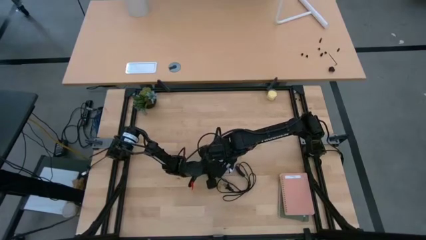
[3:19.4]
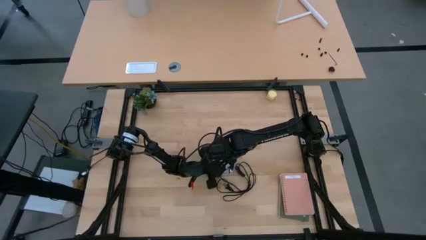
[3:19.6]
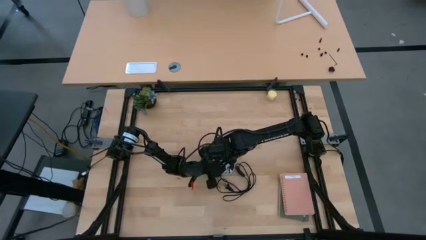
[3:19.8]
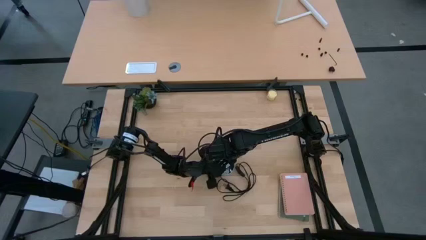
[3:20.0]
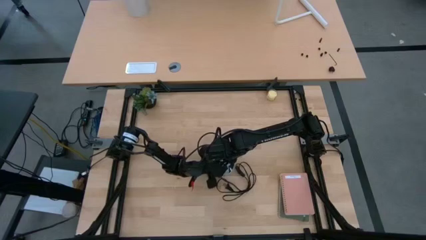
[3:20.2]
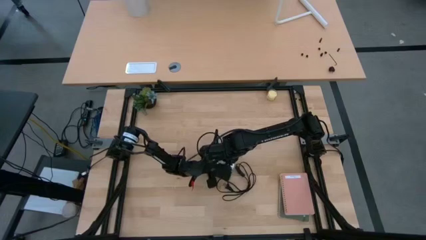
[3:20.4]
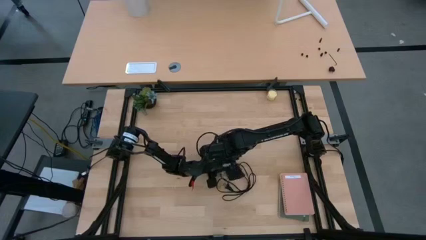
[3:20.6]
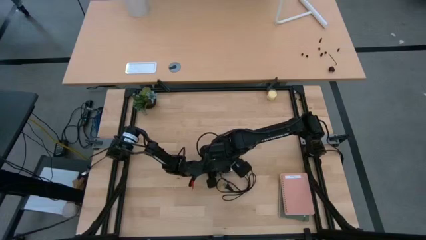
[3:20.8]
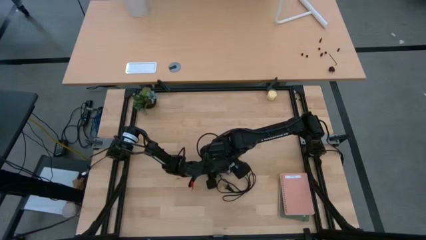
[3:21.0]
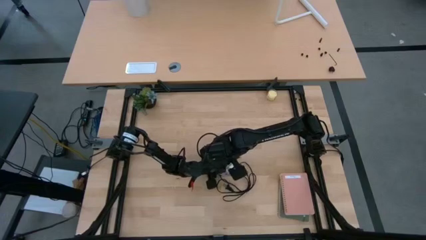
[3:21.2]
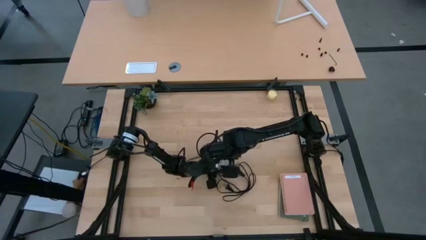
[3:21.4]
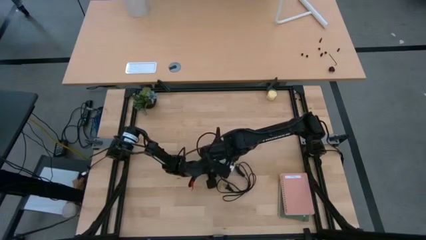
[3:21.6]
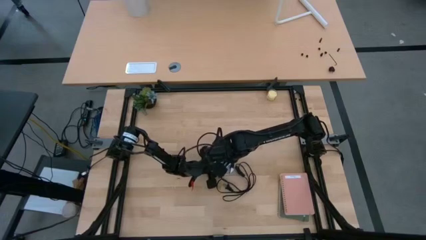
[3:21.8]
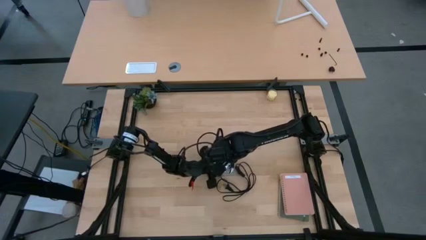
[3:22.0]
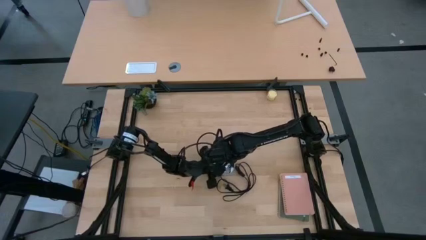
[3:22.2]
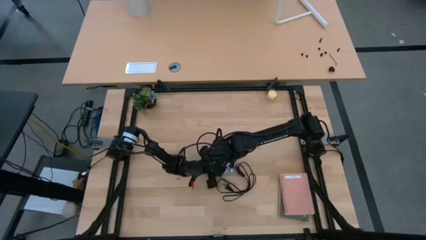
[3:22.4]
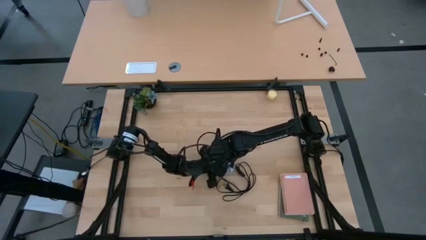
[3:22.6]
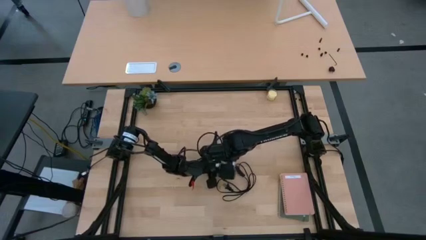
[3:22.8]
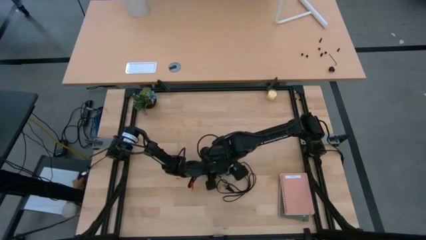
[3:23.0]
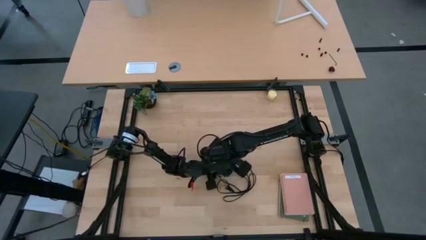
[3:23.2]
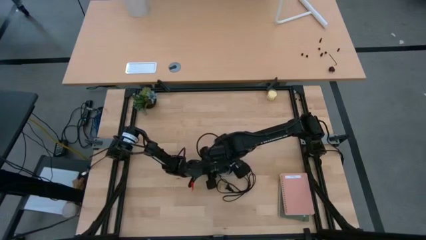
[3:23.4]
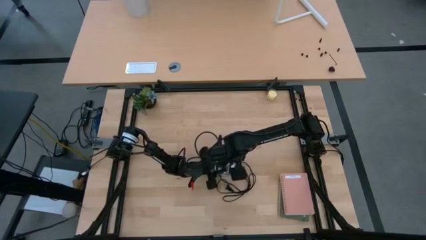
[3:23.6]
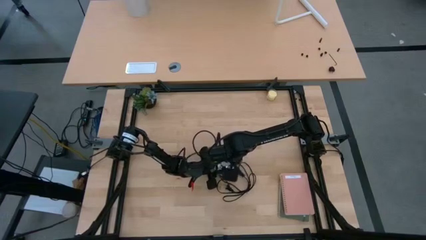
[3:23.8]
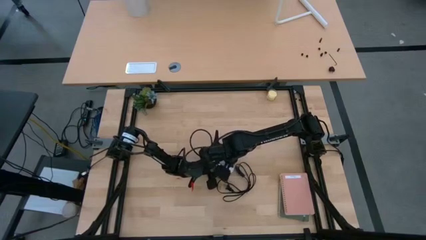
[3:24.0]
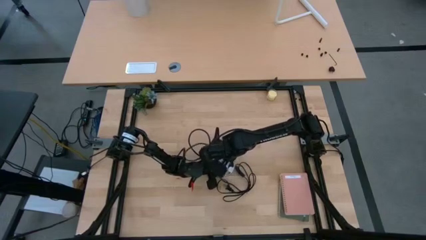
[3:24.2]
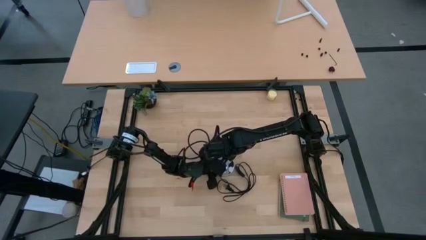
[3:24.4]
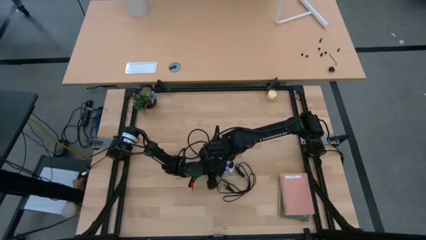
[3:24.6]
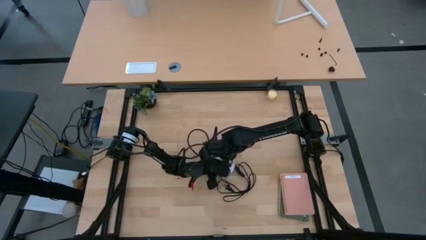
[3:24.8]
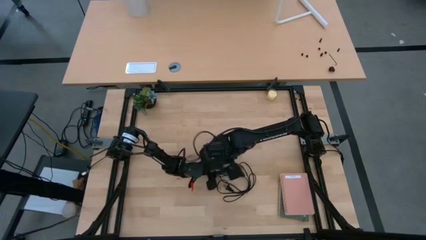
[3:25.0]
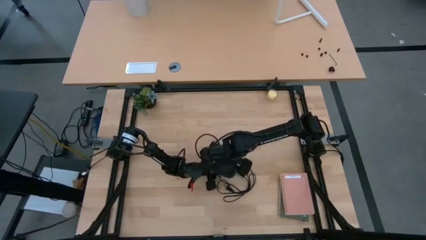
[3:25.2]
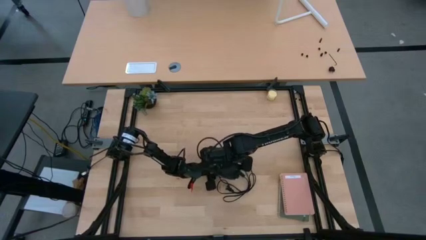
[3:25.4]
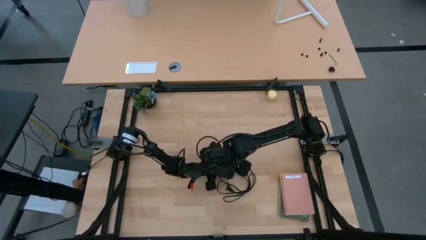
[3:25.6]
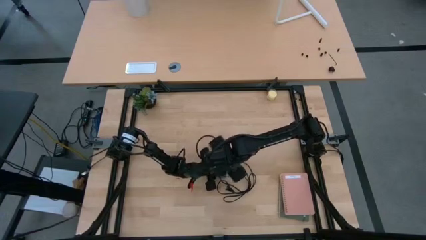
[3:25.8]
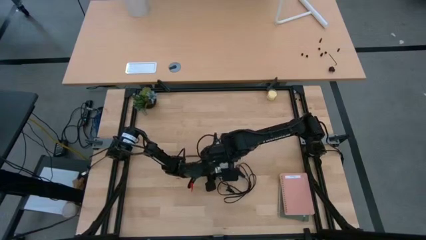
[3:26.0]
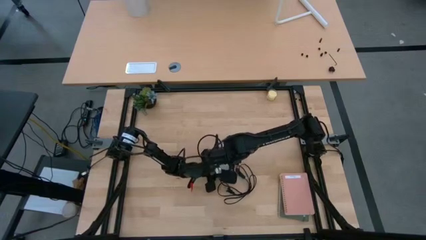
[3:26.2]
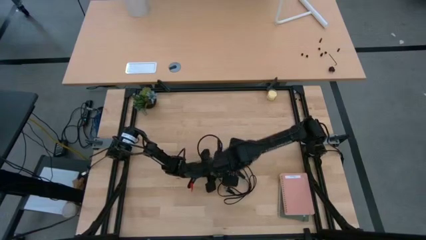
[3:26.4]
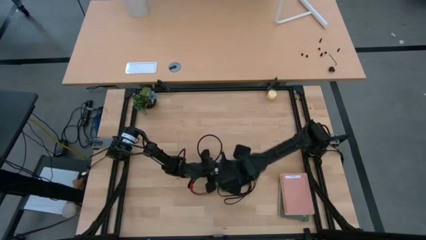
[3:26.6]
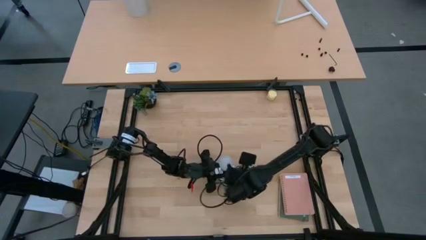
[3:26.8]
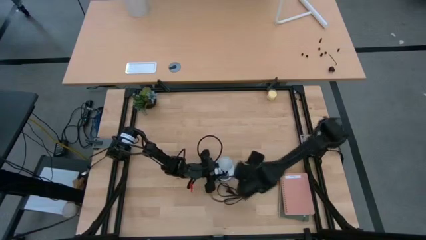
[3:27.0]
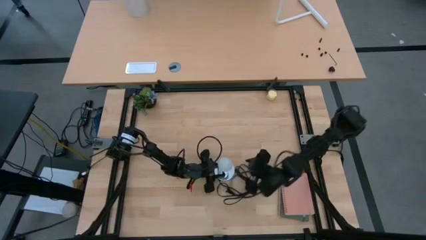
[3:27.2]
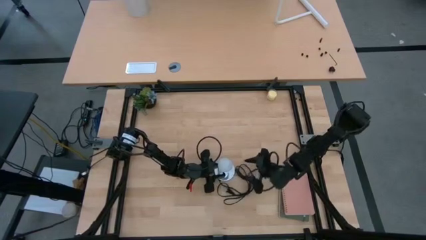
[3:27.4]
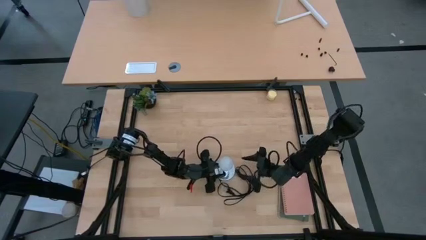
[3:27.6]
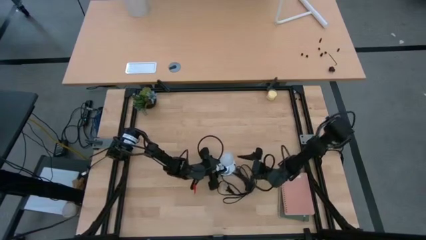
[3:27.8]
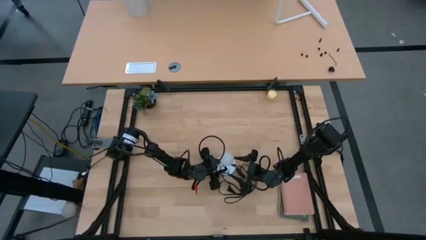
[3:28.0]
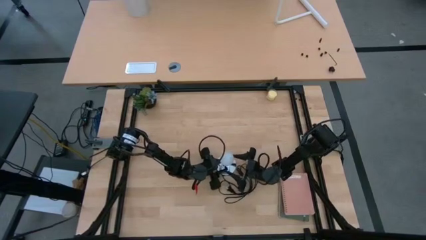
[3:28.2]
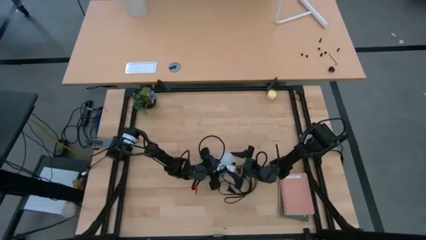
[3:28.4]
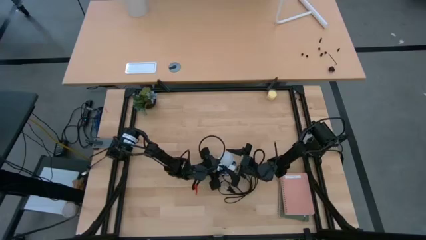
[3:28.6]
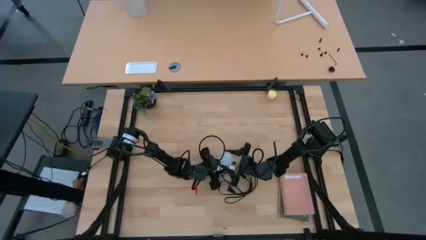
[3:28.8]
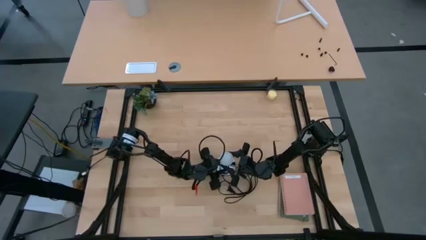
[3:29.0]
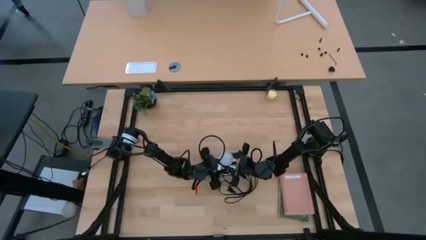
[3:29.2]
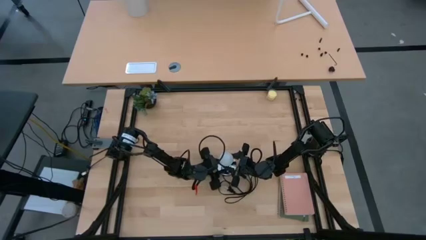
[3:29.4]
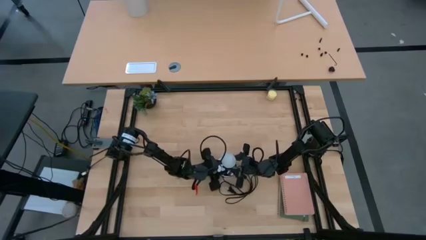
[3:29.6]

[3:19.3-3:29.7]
Task: Screw lightbulb
Remove the lightbulb from the lamp

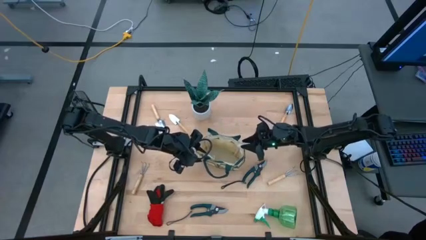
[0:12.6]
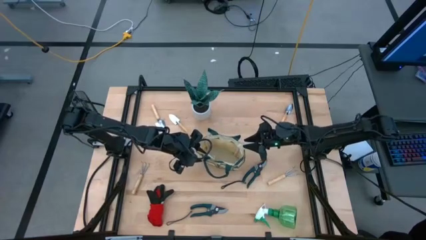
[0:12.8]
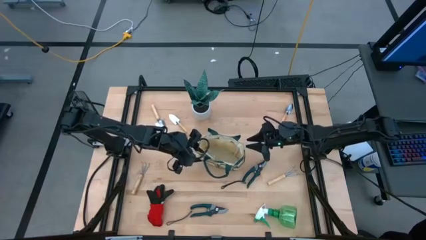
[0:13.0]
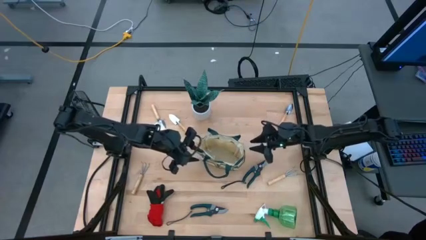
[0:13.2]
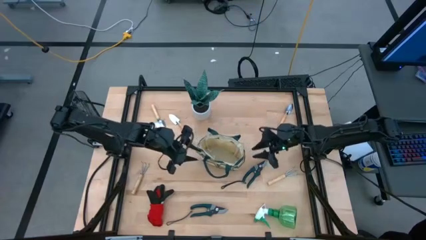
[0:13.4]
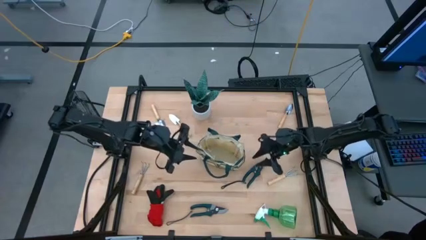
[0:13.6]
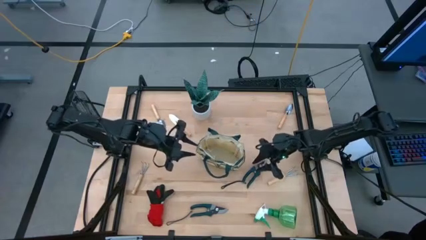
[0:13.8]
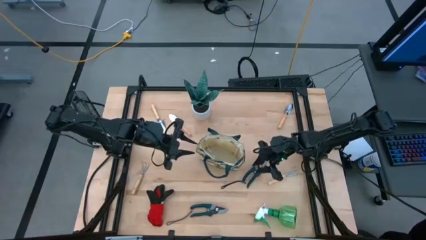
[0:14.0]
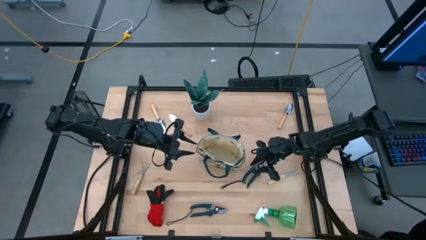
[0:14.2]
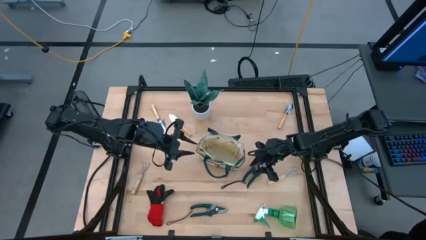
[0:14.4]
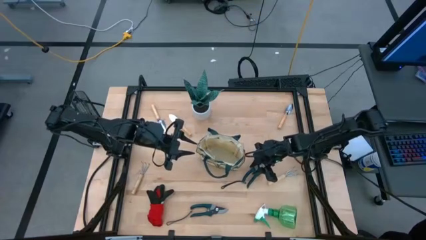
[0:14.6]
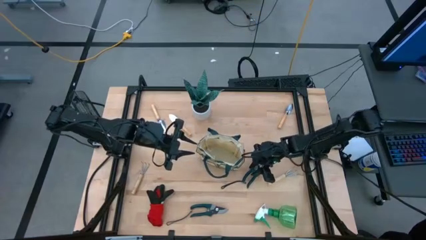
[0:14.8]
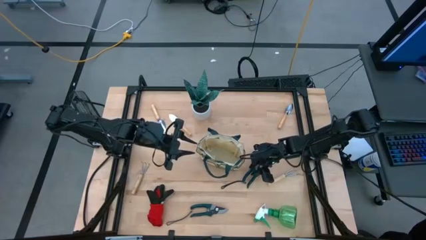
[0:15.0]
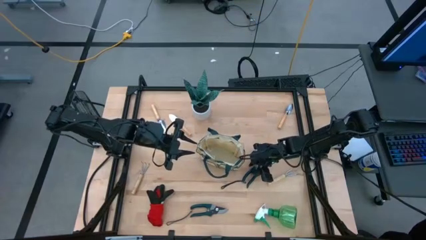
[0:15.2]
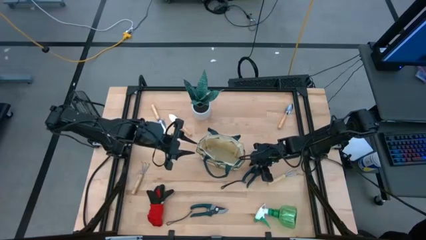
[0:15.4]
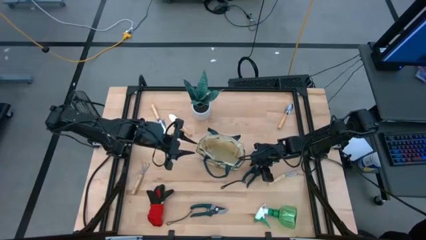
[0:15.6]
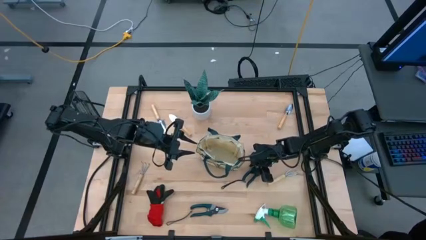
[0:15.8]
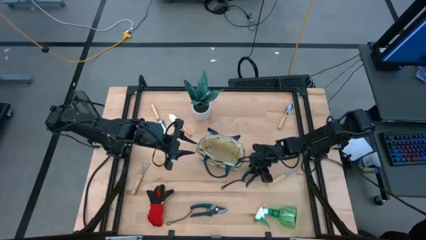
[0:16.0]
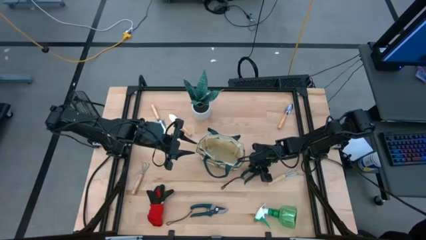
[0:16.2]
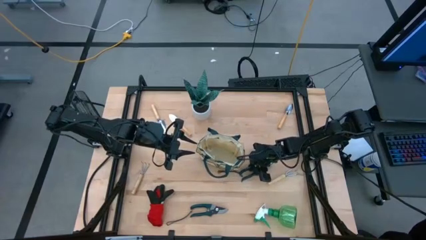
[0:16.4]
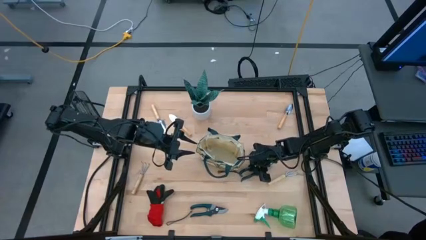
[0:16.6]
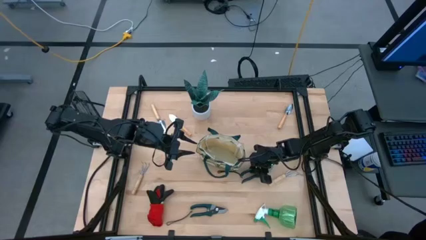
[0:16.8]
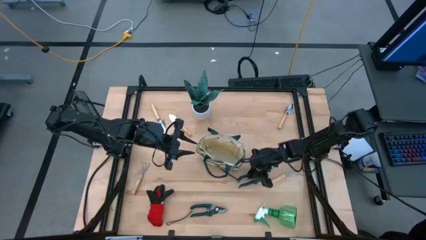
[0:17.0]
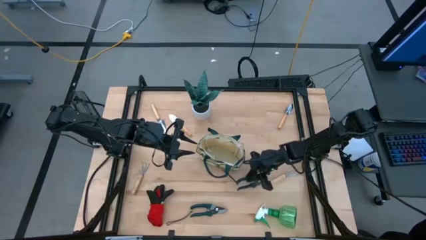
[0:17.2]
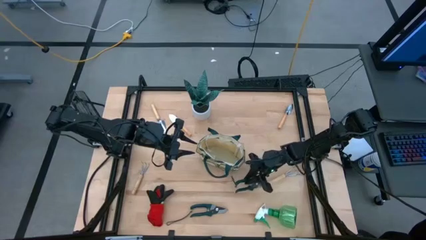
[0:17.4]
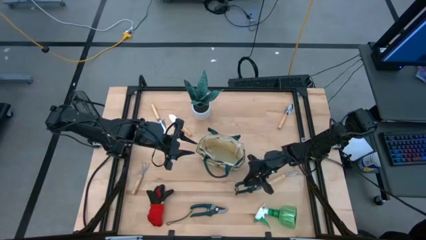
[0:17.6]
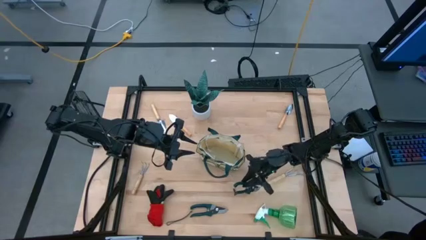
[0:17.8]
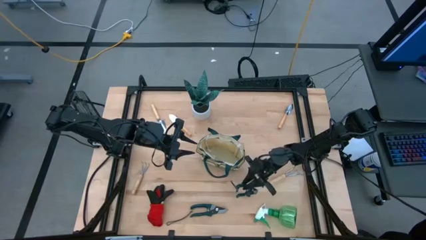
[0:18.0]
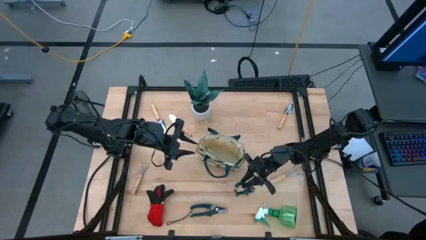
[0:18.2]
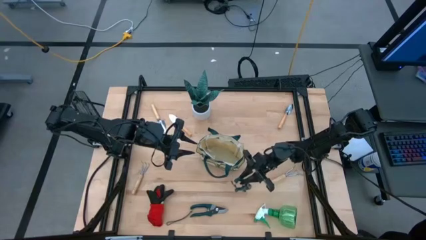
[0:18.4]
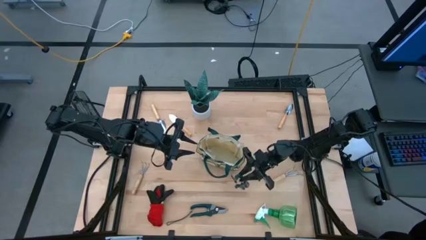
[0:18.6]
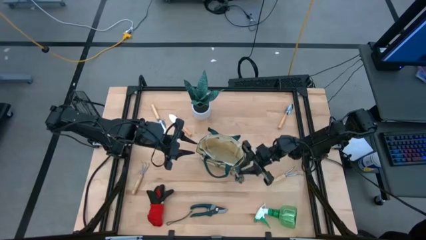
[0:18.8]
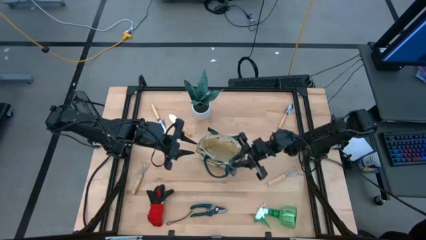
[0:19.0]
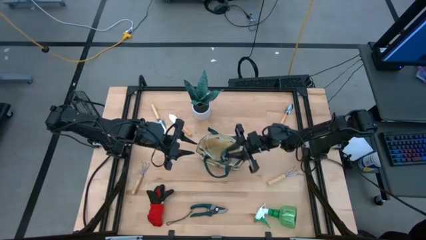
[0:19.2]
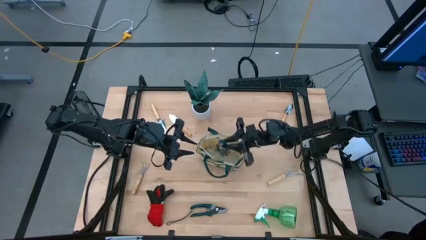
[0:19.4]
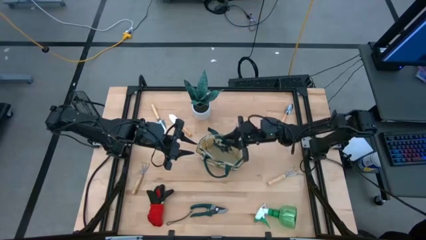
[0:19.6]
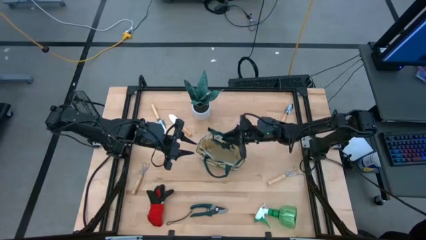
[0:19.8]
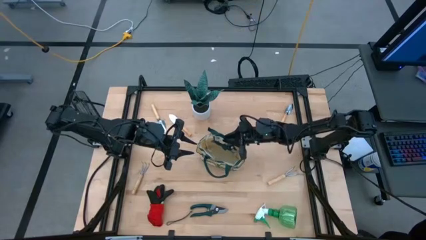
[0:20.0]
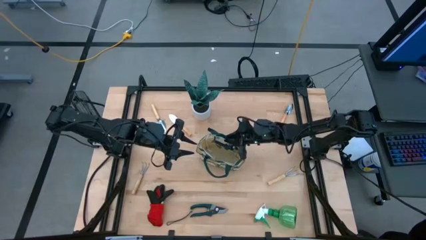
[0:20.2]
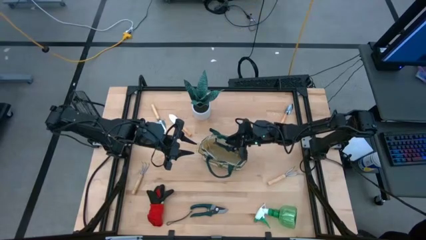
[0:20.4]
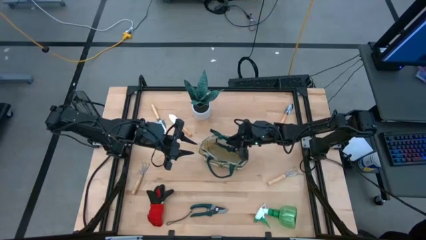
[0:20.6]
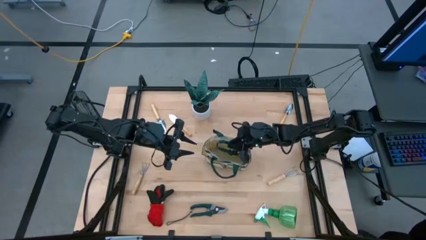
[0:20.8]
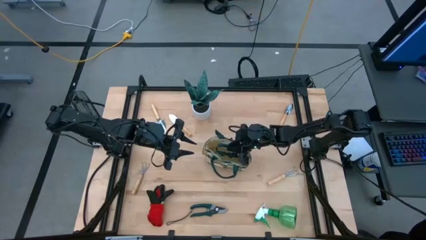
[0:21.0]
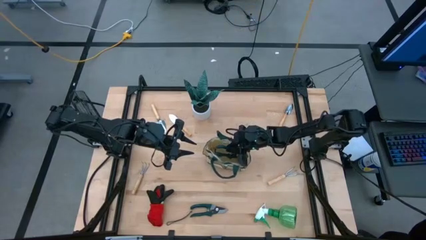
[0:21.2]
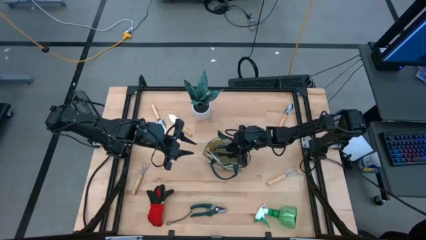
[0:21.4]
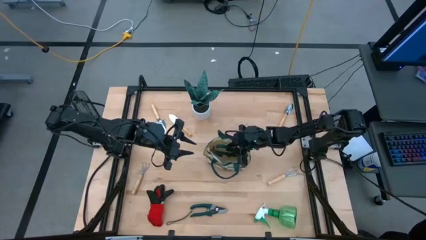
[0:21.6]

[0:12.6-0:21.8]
Task: Pick & Place Garden tools in Gardening bag
Put the top shear scissors into the gardening bag
